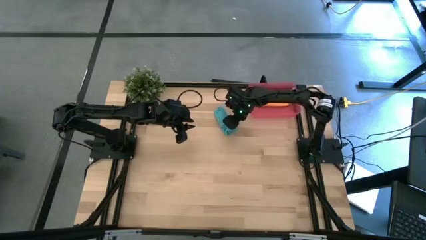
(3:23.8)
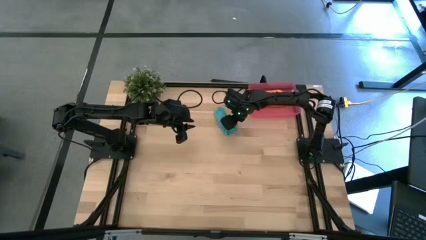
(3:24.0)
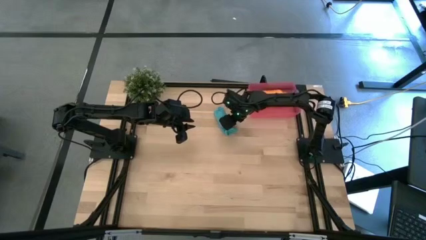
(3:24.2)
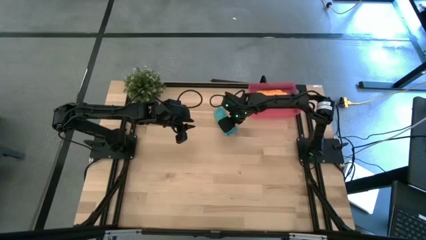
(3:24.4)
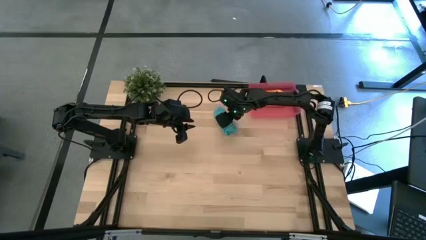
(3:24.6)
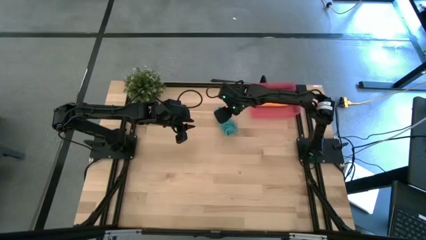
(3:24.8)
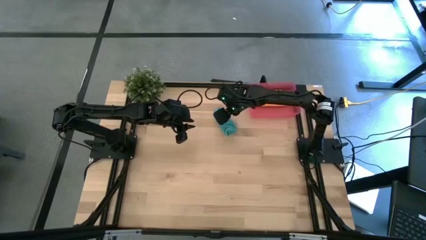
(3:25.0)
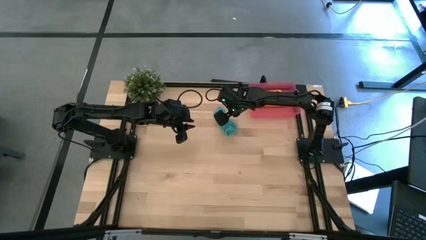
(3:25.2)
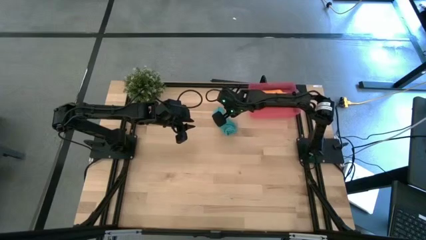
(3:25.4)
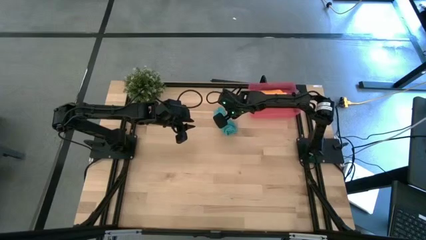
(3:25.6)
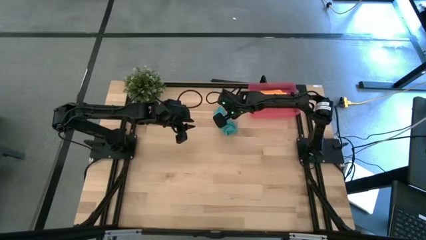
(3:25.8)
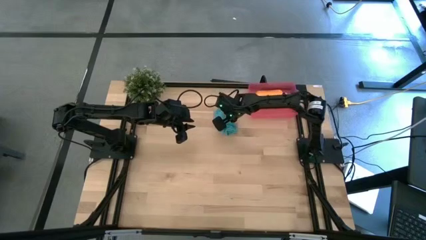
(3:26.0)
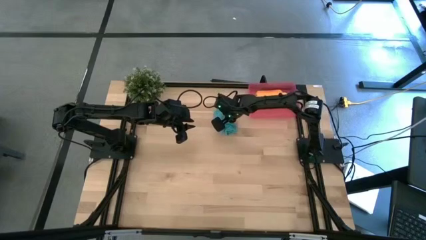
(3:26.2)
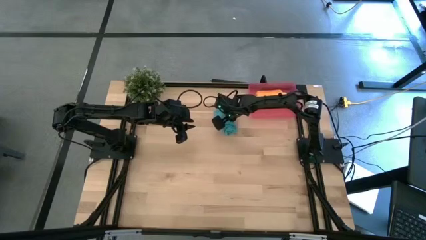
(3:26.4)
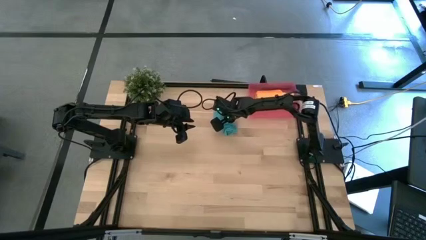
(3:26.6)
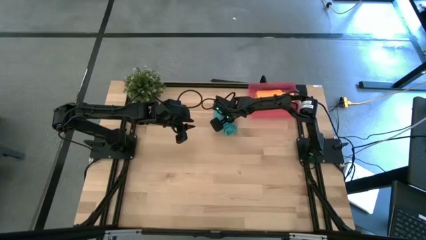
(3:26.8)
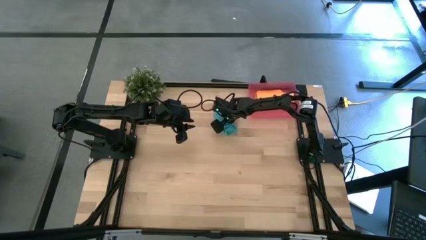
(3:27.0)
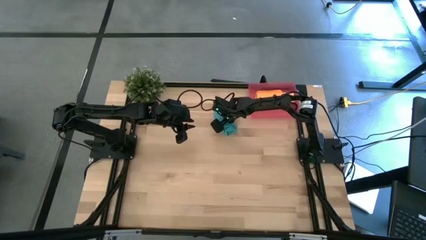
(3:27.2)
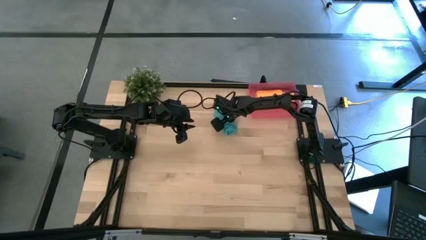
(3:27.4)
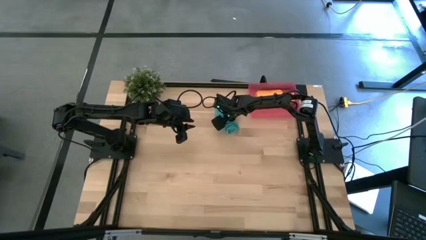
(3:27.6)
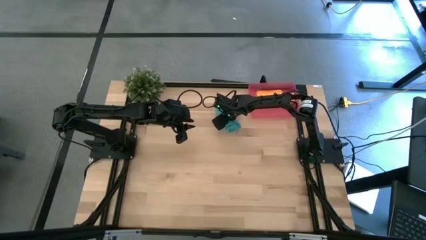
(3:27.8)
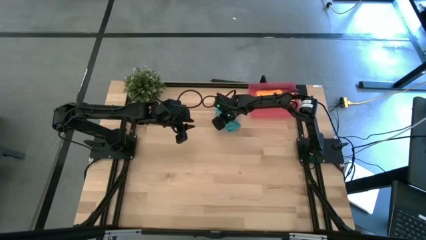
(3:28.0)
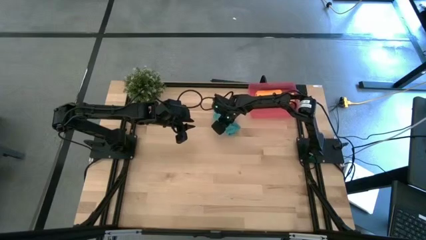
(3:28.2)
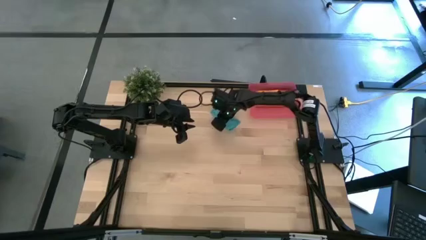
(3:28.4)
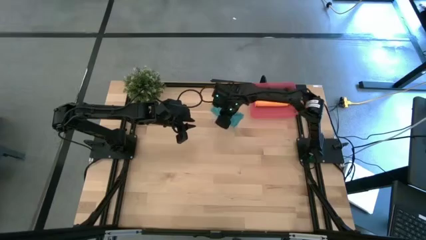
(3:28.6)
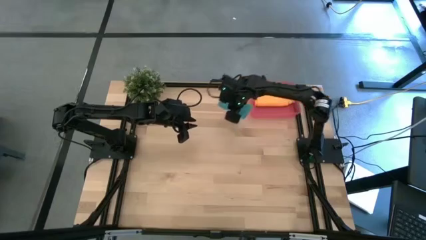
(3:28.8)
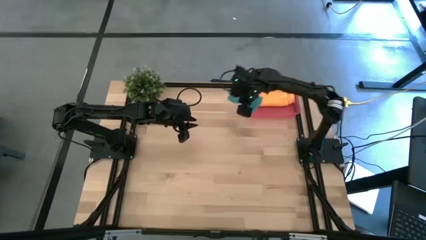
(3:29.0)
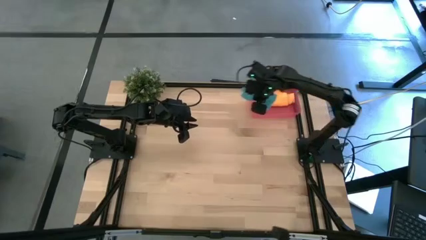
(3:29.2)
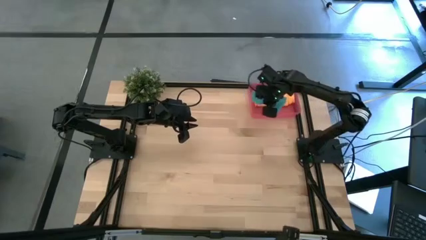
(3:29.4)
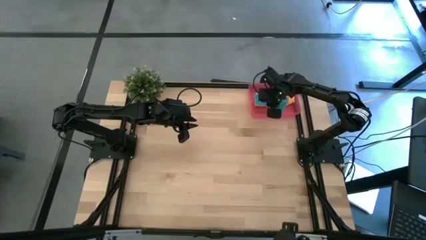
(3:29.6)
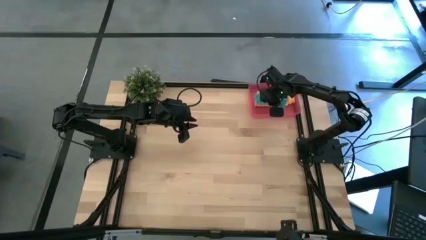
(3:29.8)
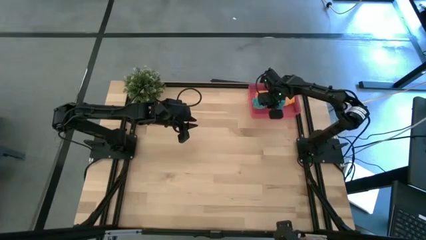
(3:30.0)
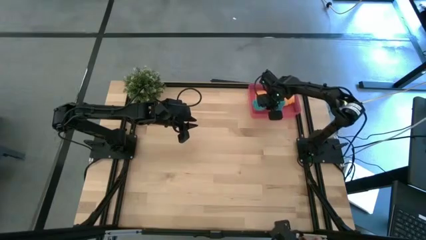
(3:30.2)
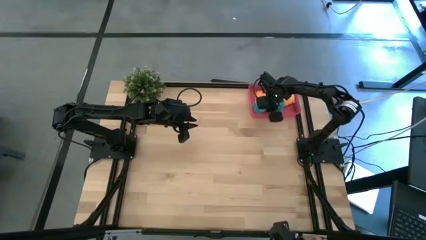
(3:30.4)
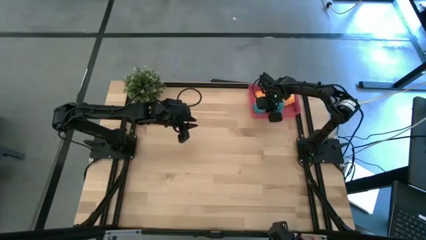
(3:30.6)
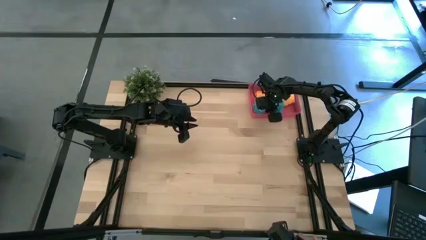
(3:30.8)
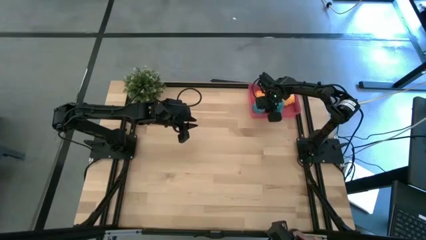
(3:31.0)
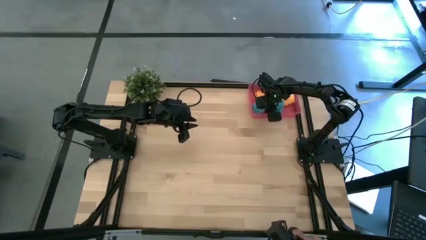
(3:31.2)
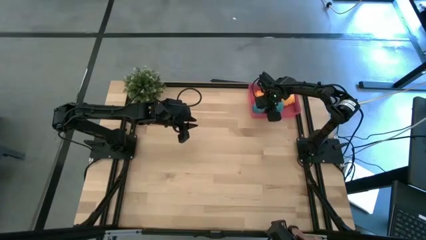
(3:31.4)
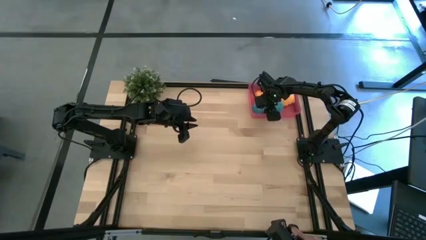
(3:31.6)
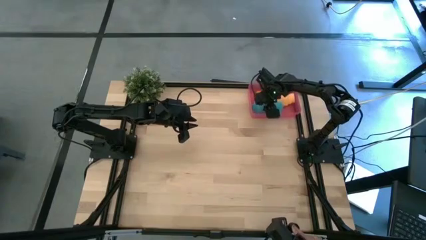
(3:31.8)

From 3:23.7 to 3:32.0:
Task: Roll microfiber towels into tight, uniform cylinder then place into a basket
Put the blue microfiber towel into the pink bin

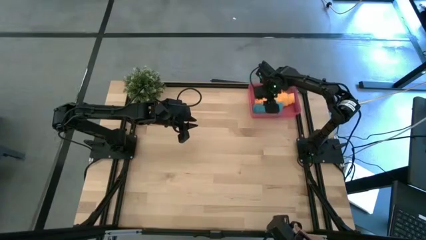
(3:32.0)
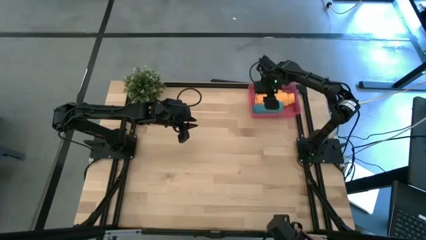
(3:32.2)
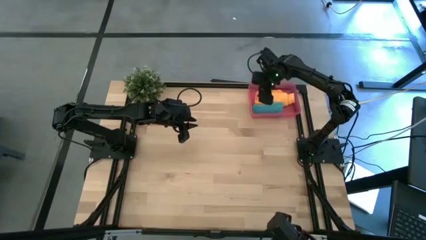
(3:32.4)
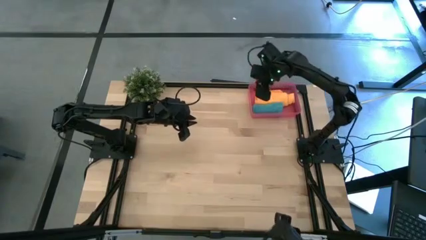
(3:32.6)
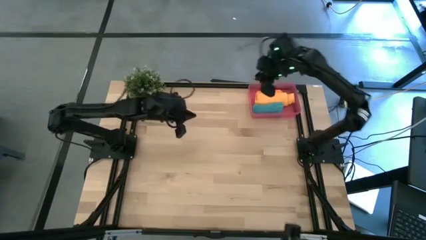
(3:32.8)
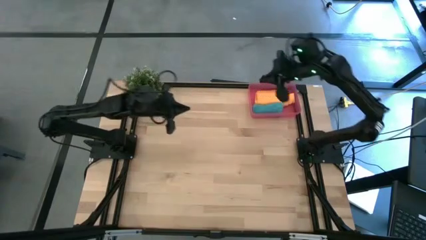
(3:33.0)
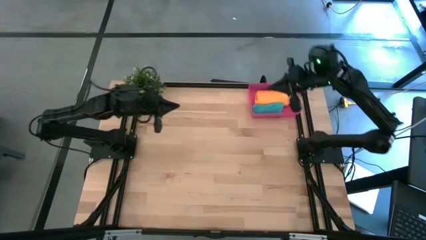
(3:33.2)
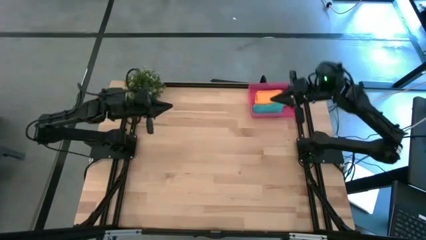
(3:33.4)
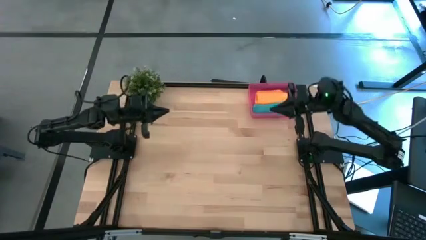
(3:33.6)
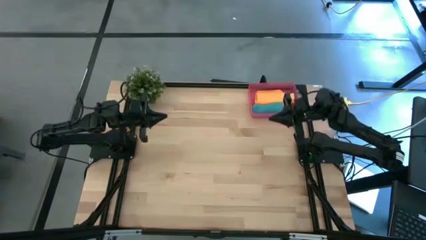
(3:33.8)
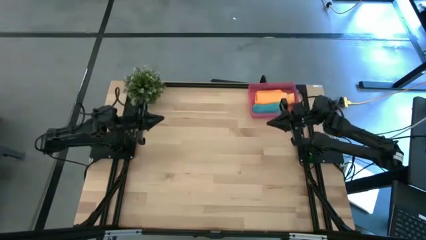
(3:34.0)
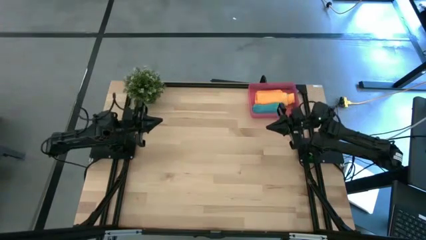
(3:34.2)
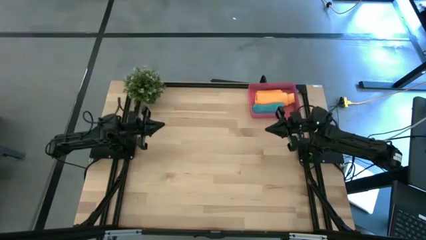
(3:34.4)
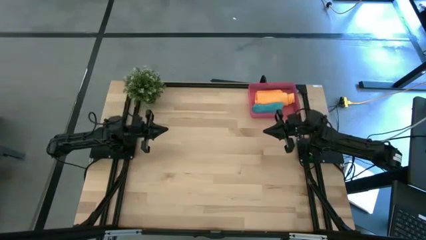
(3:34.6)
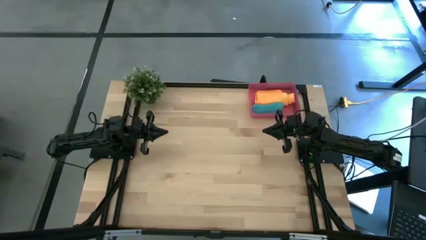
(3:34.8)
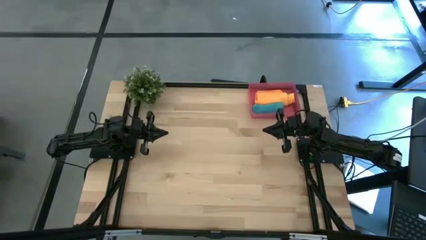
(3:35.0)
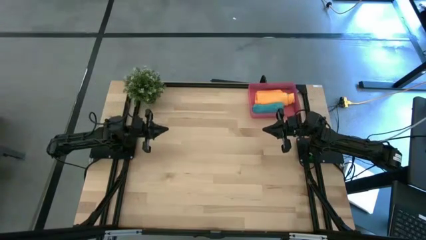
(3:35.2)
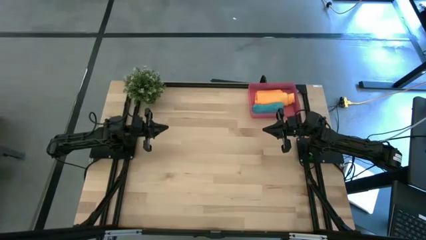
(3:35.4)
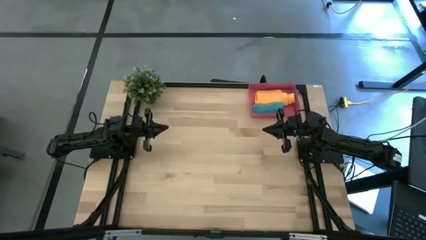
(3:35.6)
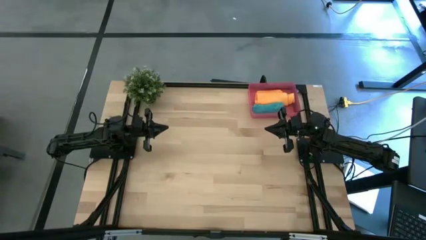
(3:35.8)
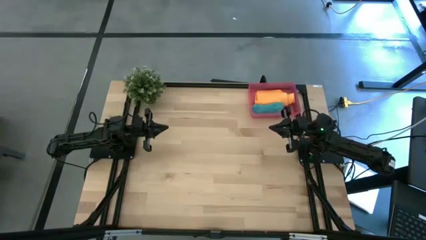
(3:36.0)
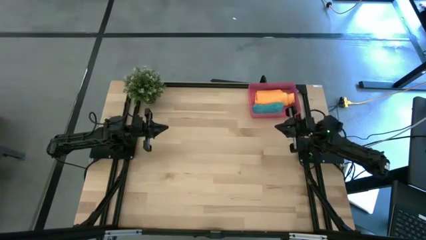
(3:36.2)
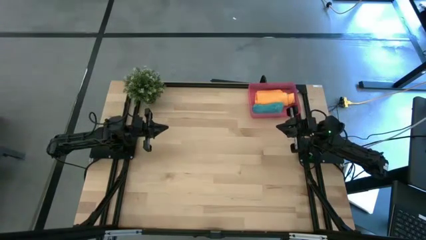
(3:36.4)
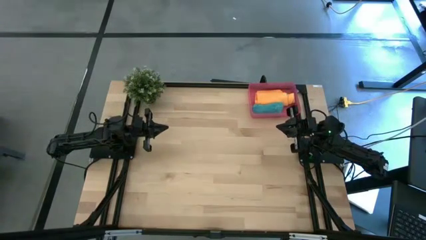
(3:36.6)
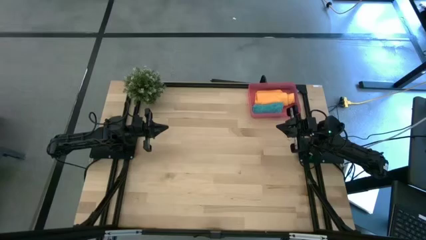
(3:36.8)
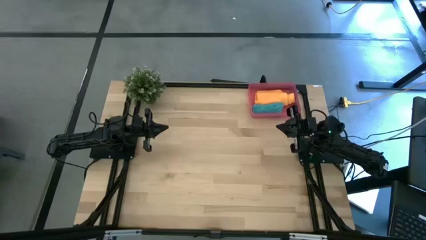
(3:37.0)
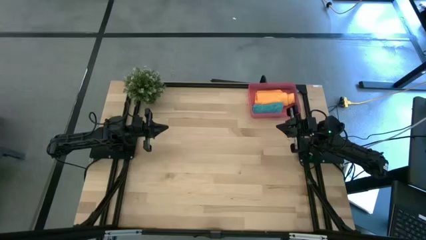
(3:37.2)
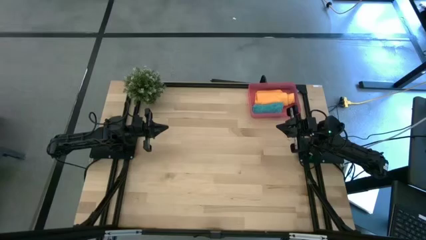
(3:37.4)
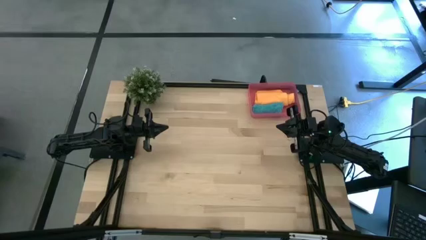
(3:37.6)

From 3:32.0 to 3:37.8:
Return to Home Position
